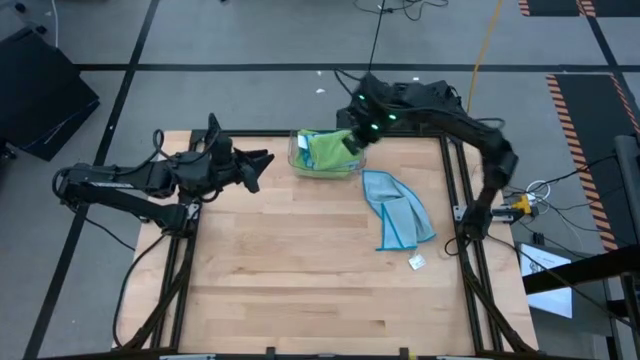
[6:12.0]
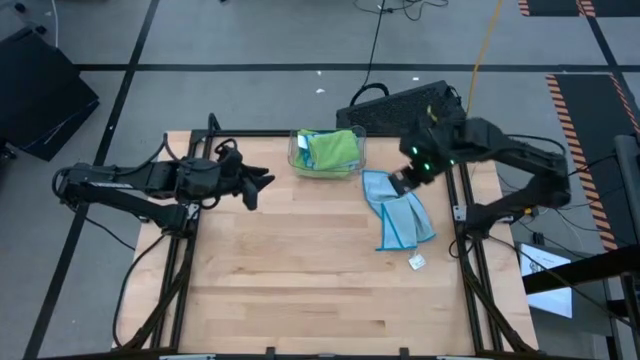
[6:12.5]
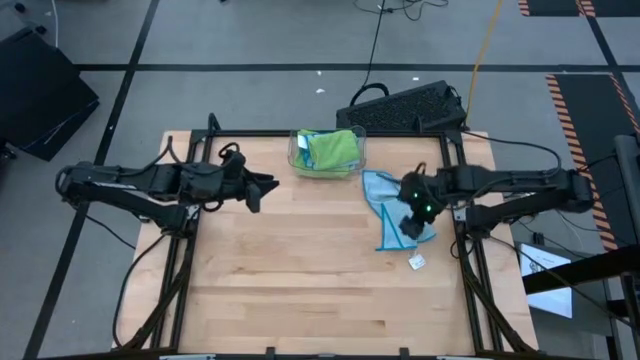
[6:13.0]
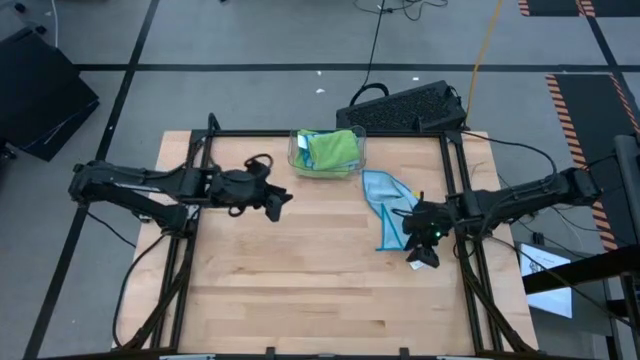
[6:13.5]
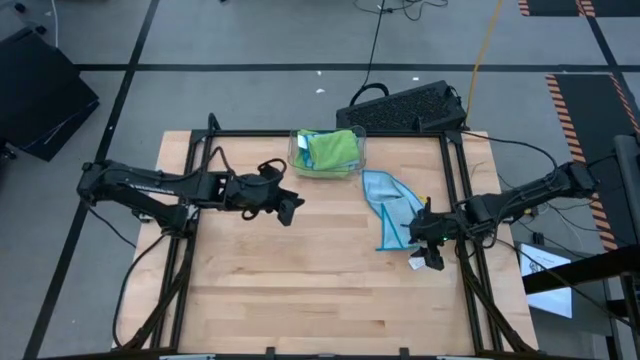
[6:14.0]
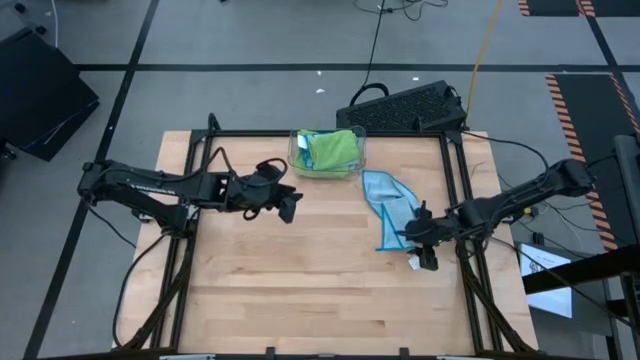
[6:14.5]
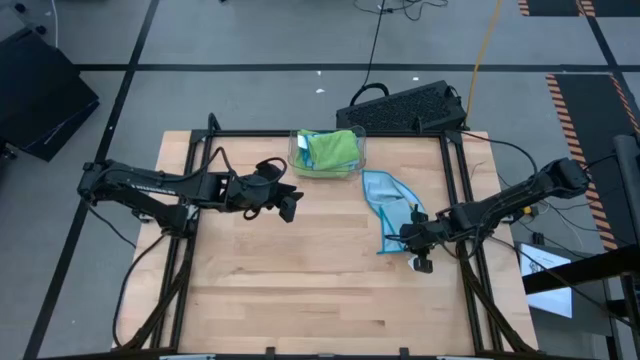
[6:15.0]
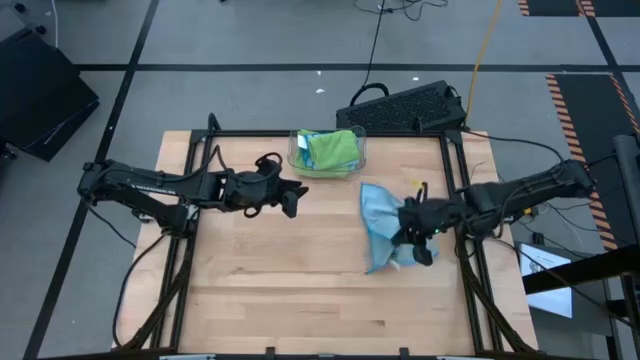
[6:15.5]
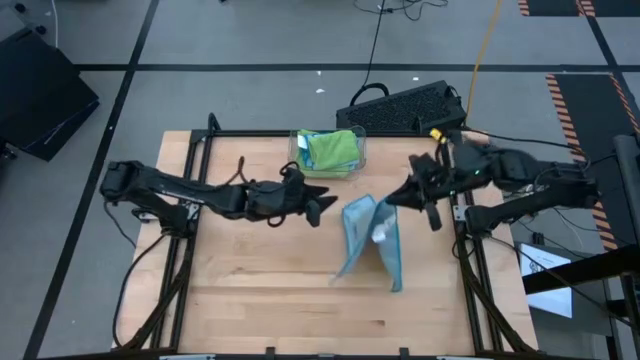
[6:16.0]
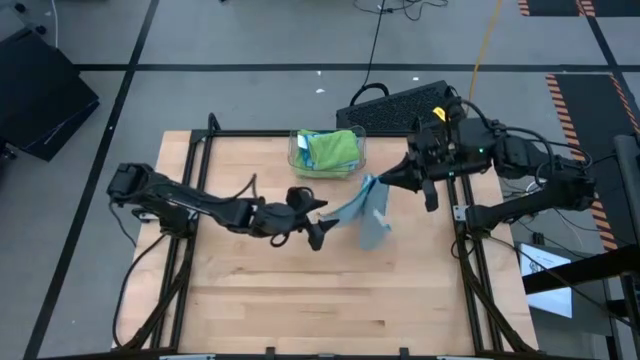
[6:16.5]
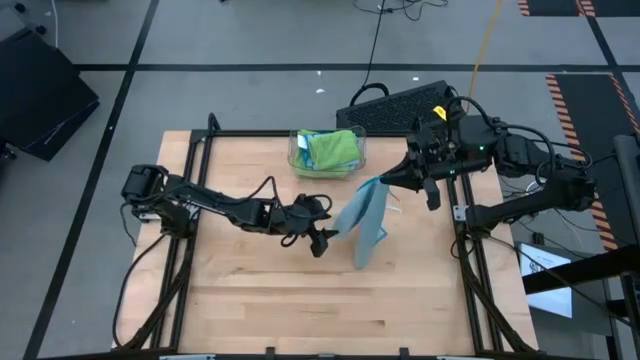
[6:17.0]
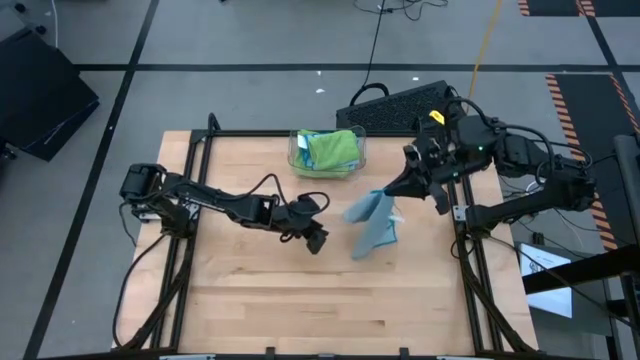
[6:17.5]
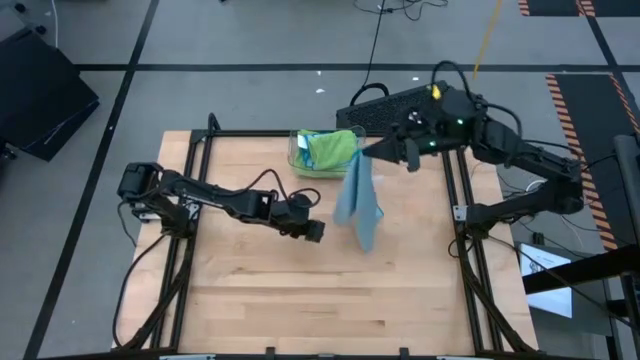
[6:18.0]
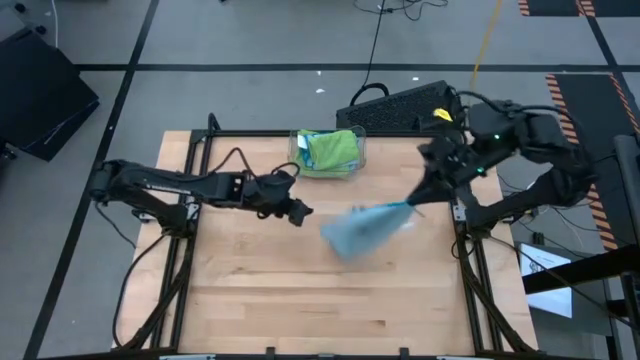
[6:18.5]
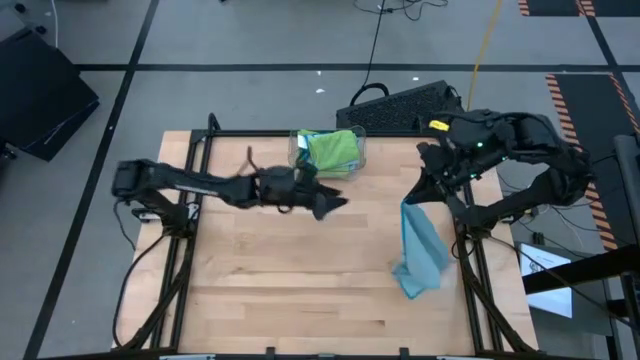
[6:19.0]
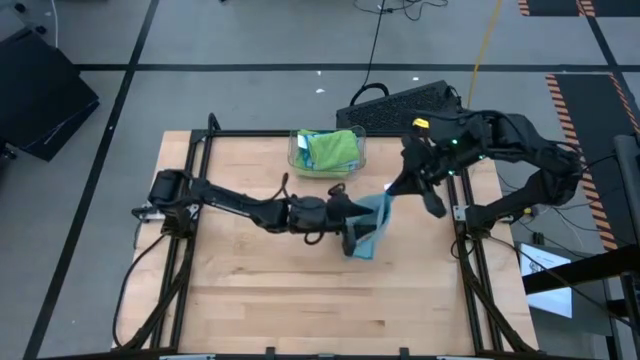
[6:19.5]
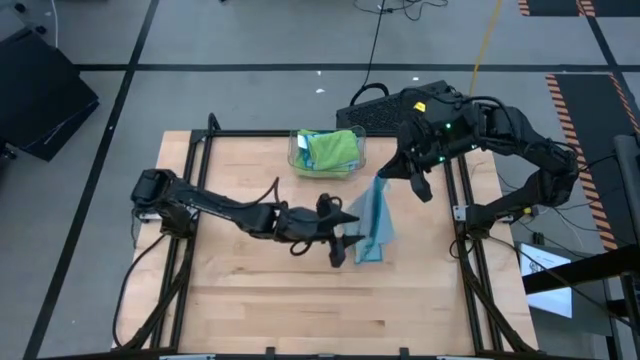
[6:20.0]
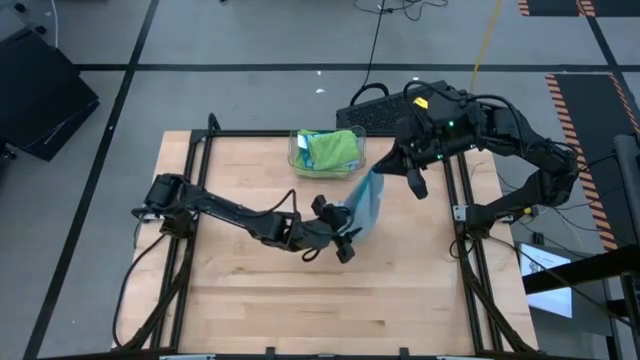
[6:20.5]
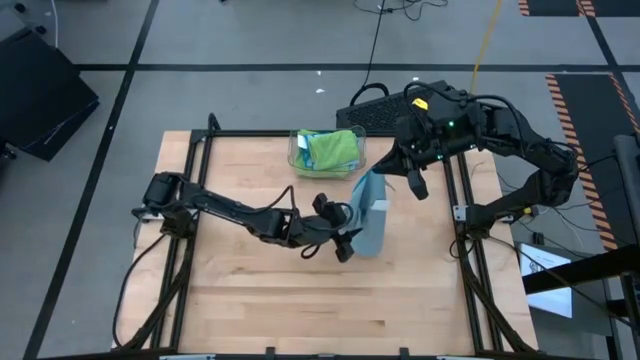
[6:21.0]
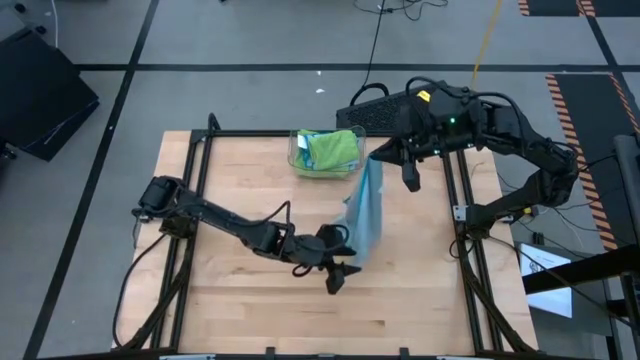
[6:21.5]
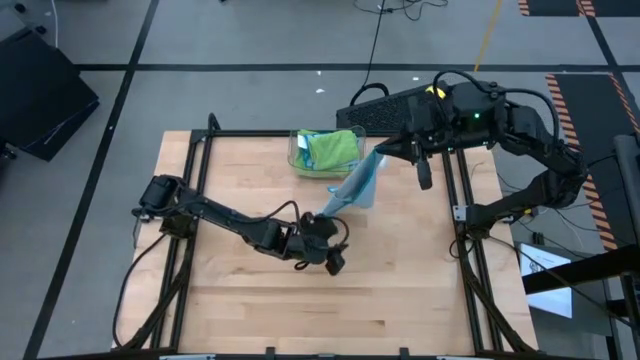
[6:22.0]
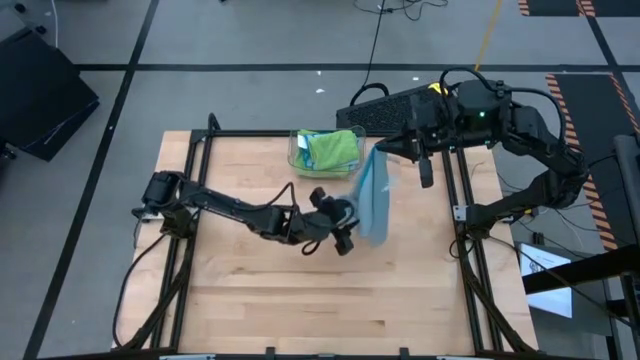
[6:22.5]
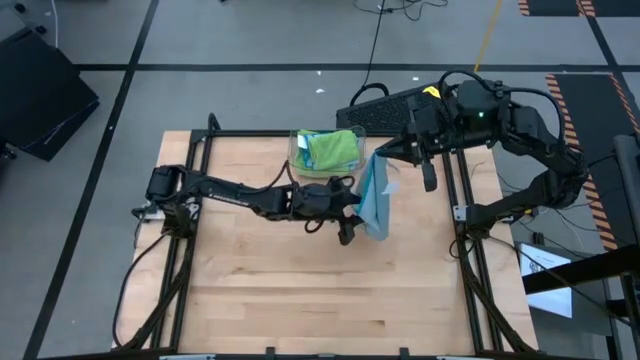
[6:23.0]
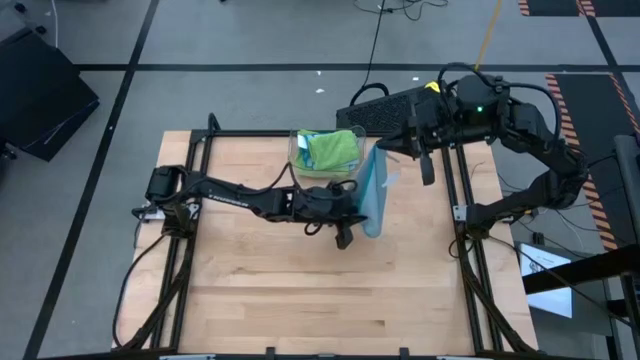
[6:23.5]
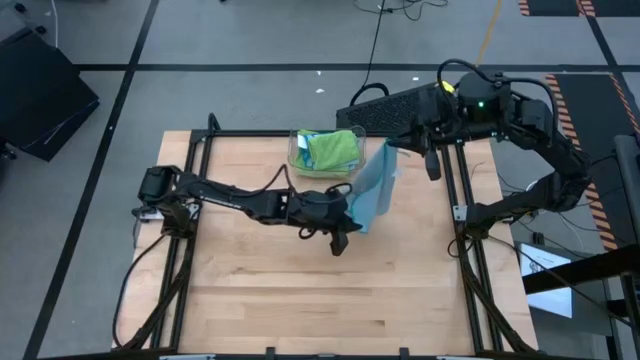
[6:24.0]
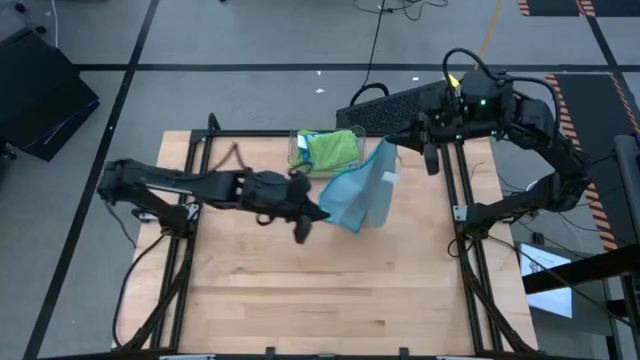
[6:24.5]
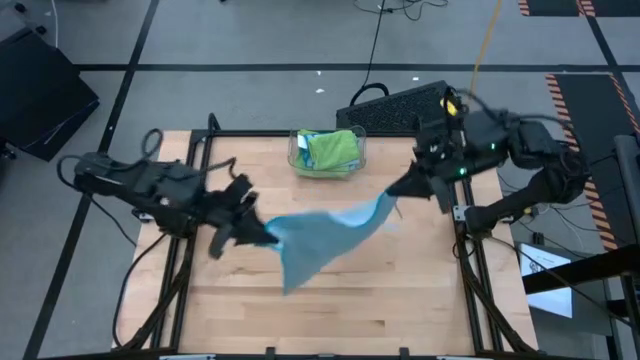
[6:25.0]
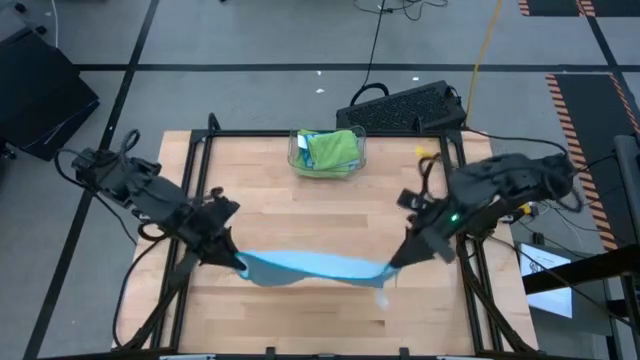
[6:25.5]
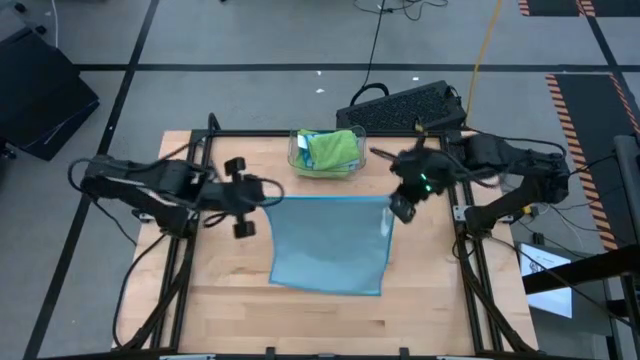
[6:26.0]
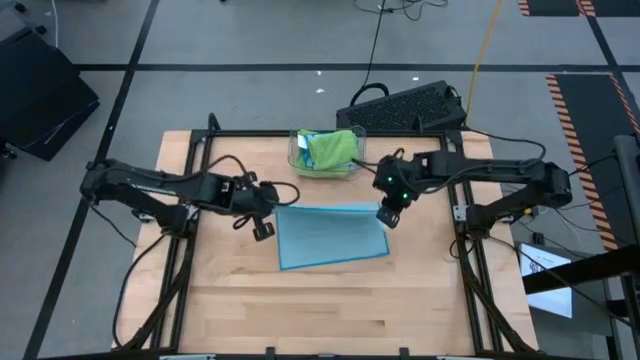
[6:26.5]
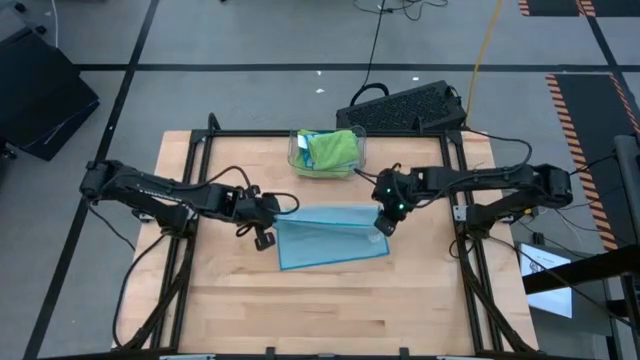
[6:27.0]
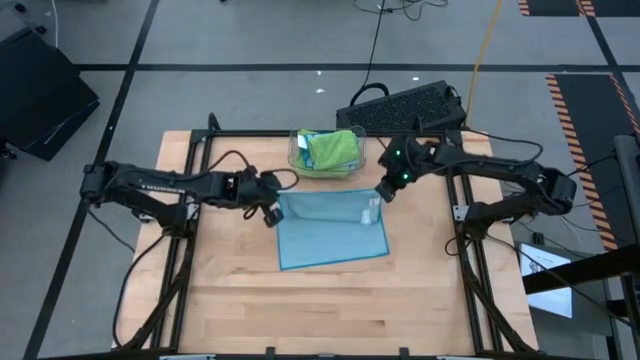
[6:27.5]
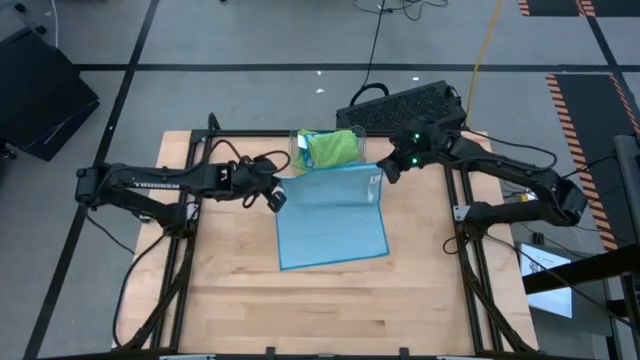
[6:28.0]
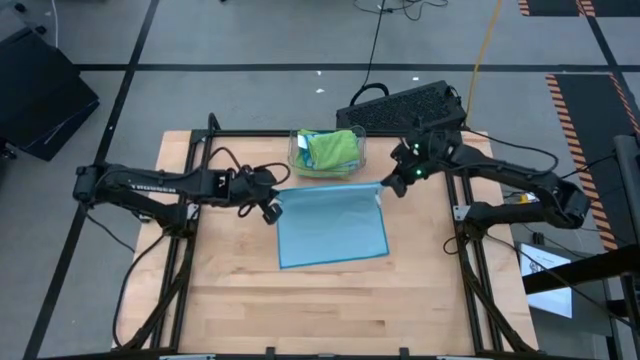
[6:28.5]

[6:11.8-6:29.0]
Task: Fold microfiber towels
Fold the blue microfiber cloth

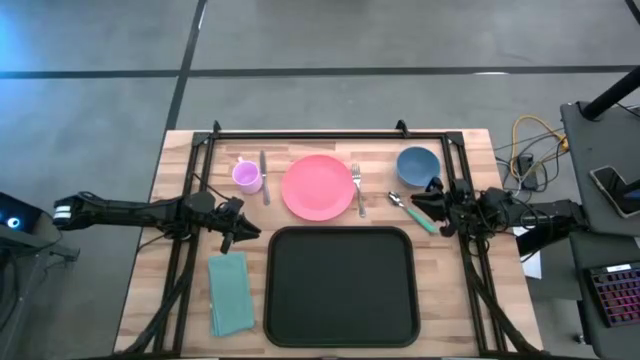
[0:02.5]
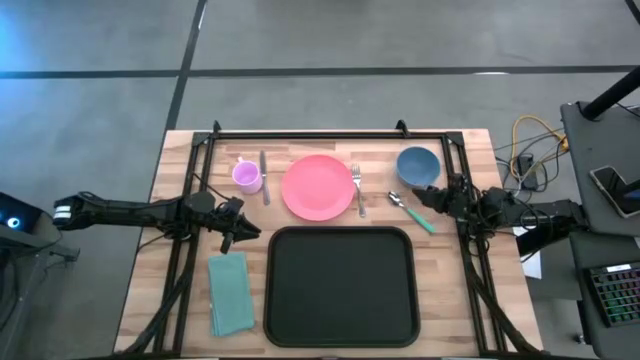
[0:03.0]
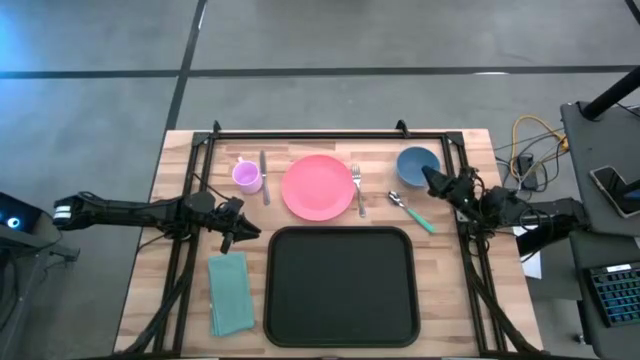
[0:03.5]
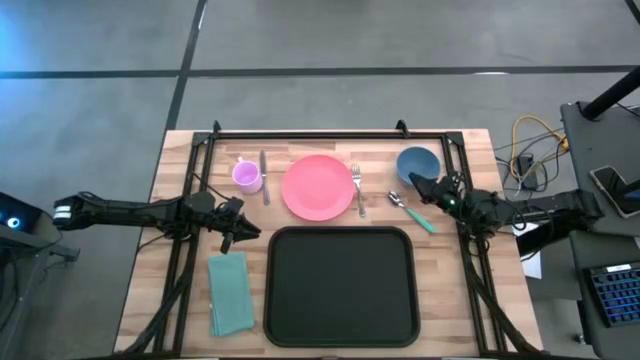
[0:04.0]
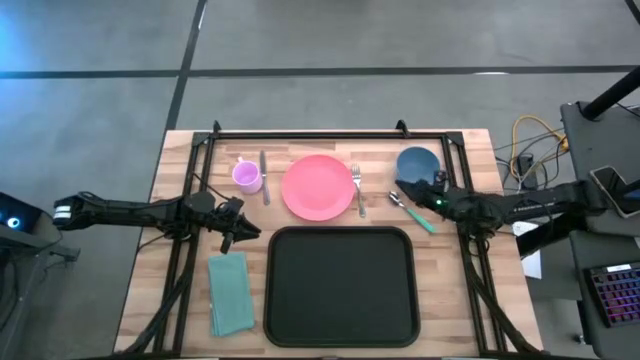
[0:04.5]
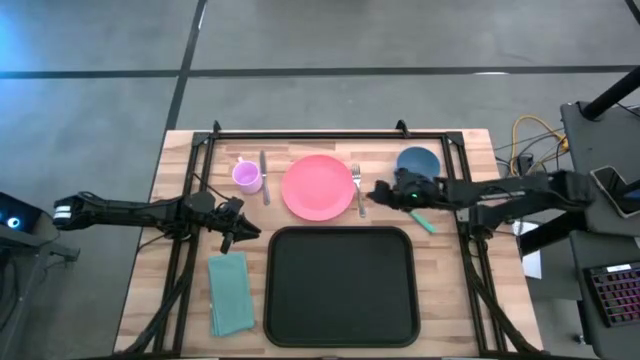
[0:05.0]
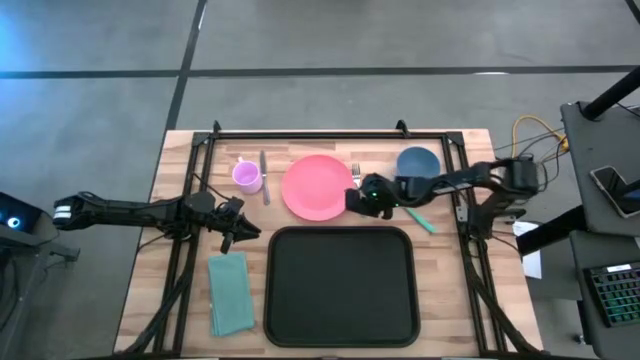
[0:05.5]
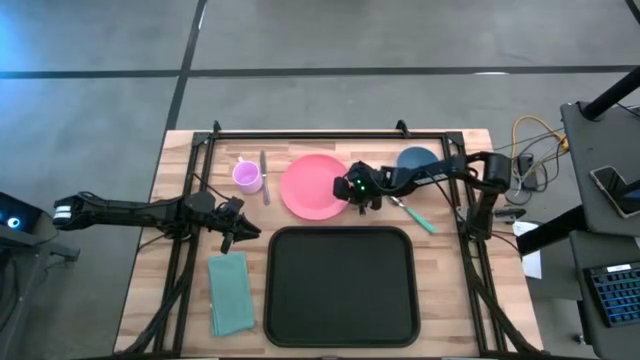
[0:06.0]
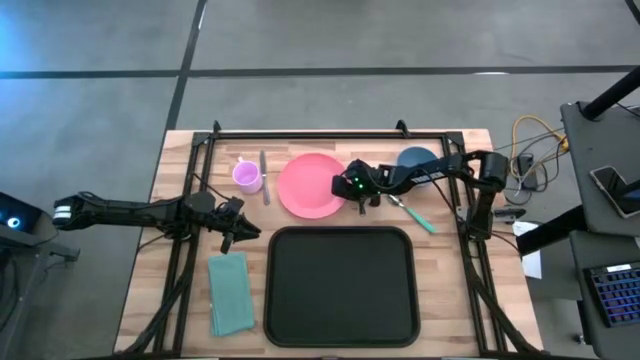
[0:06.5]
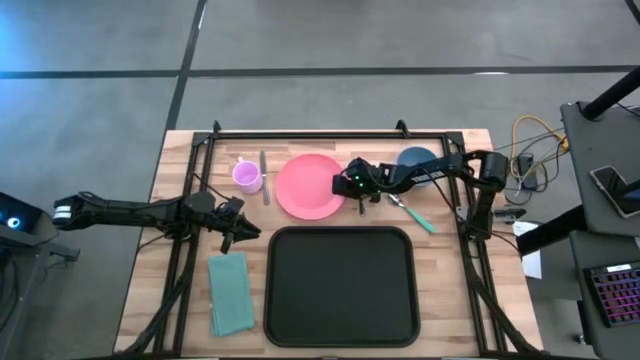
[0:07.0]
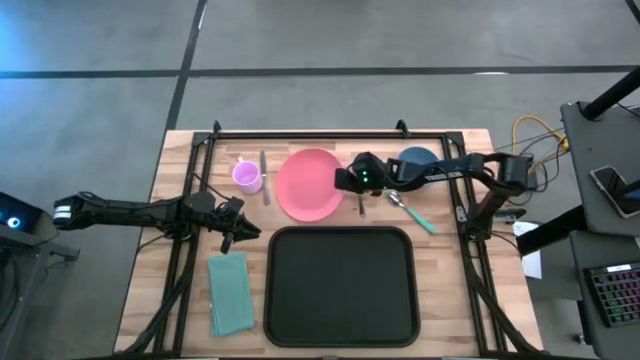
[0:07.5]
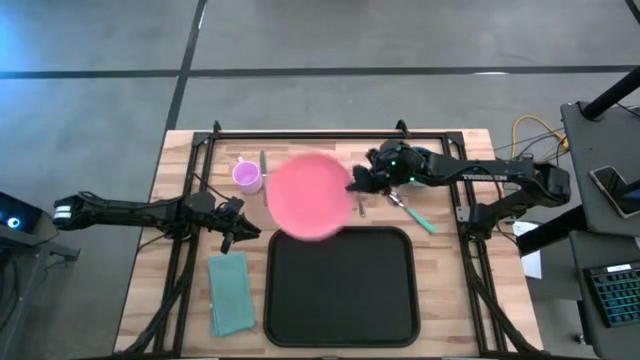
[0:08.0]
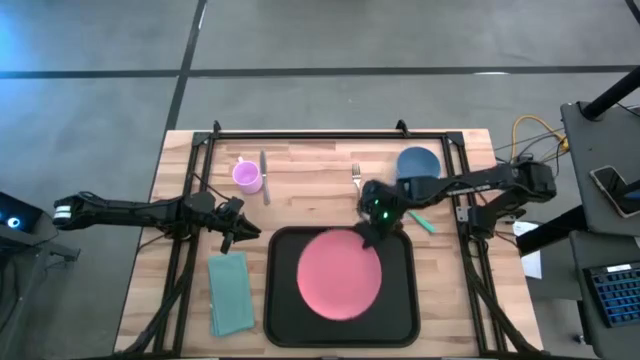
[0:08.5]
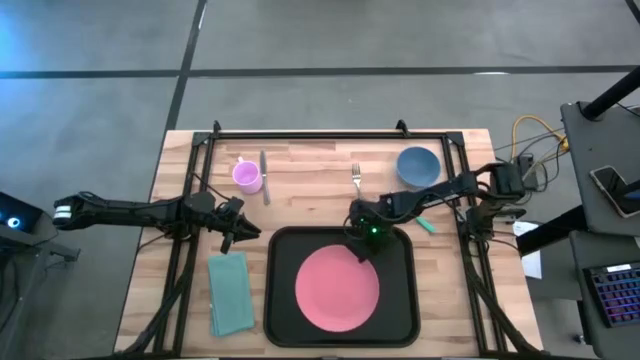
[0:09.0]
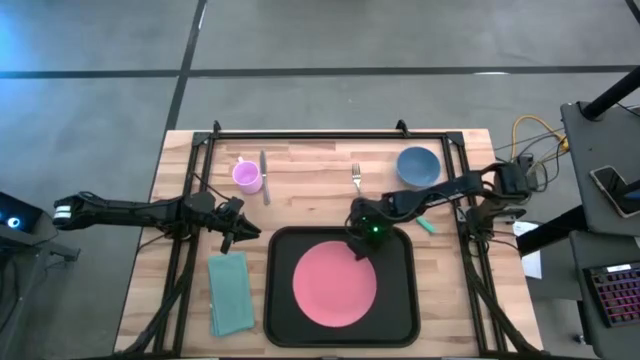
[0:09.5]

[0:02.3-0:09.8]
Task: Set up tray
Put the pink plate on the center of the black tray
